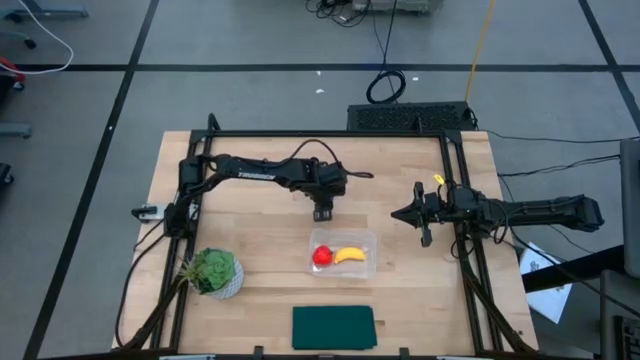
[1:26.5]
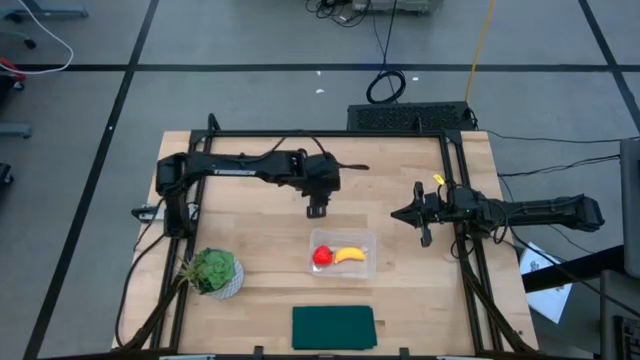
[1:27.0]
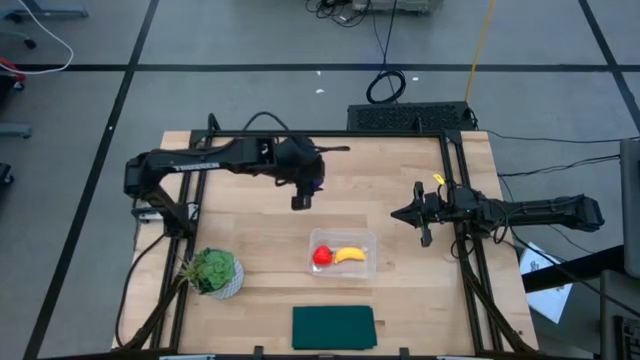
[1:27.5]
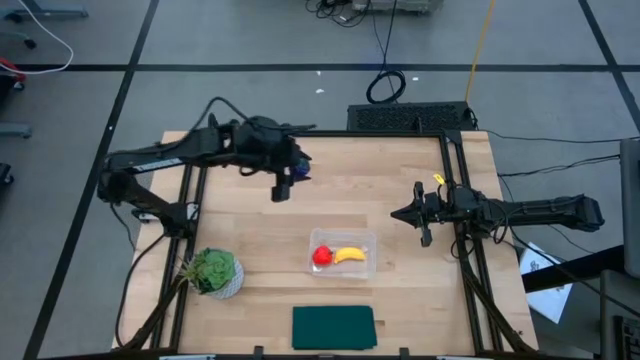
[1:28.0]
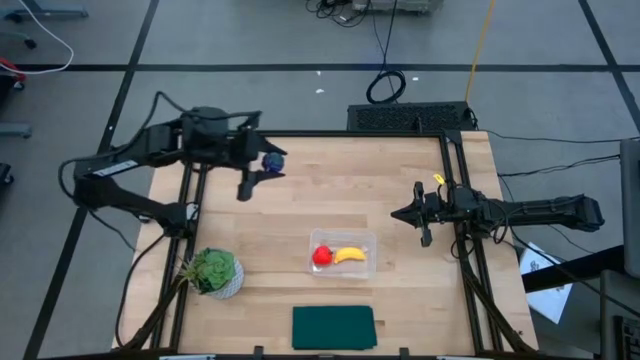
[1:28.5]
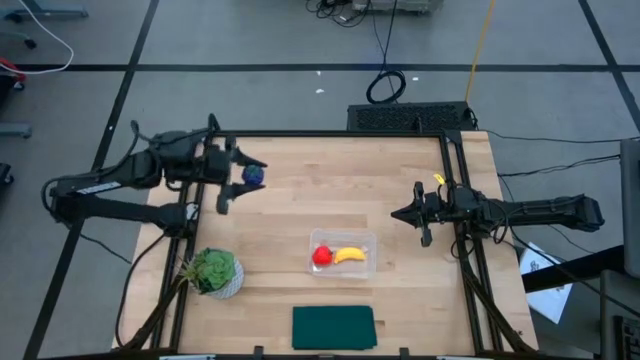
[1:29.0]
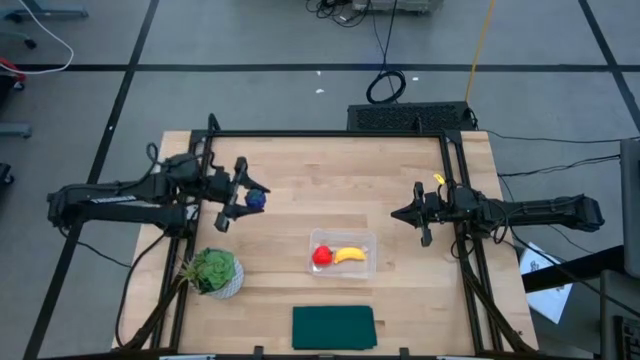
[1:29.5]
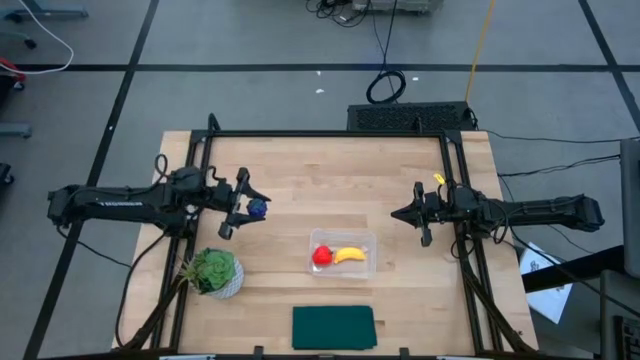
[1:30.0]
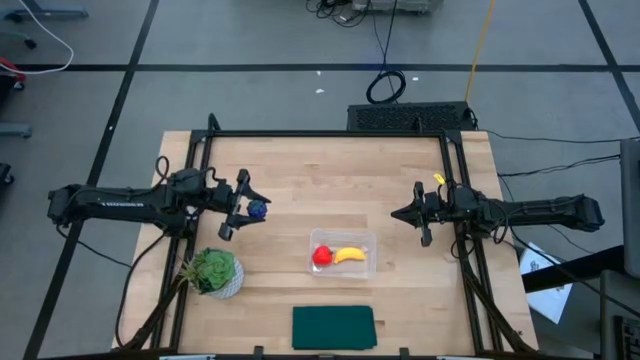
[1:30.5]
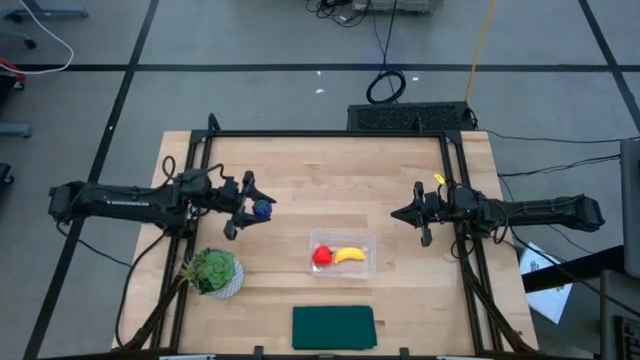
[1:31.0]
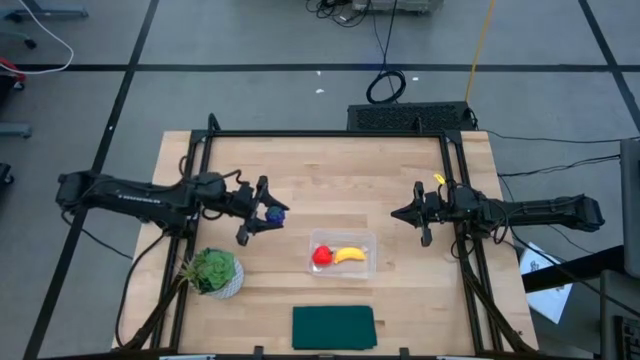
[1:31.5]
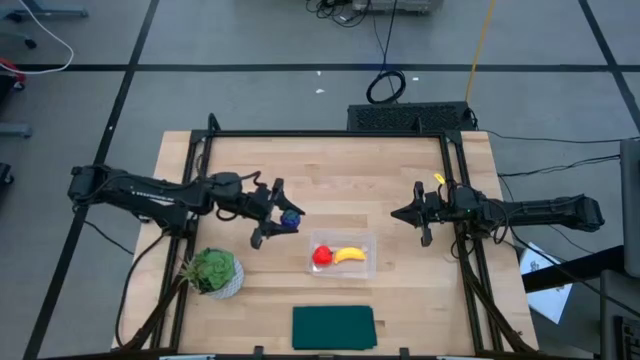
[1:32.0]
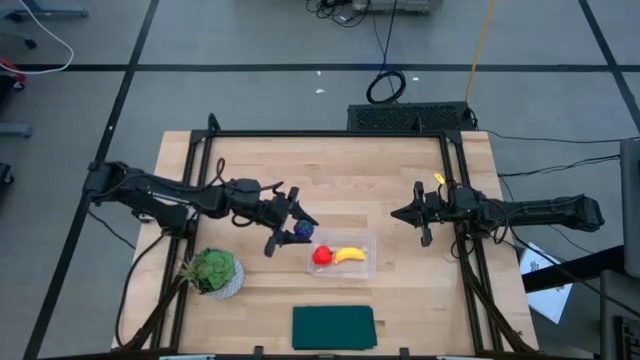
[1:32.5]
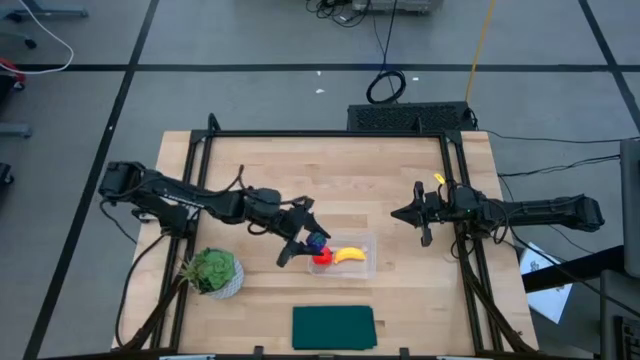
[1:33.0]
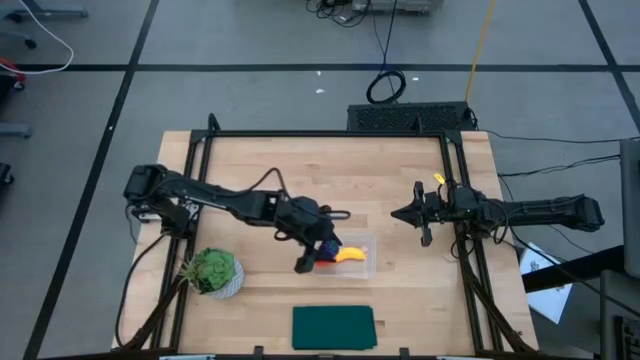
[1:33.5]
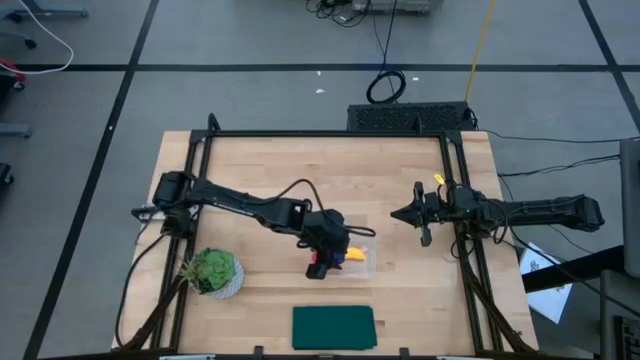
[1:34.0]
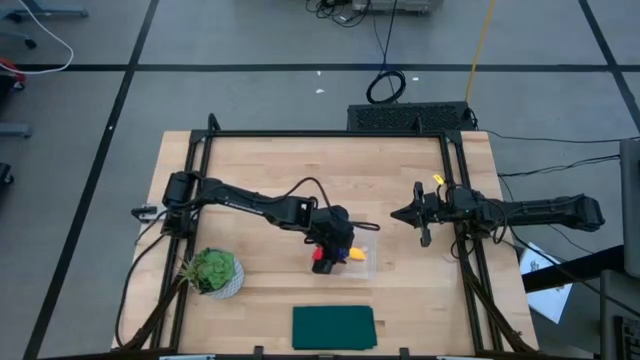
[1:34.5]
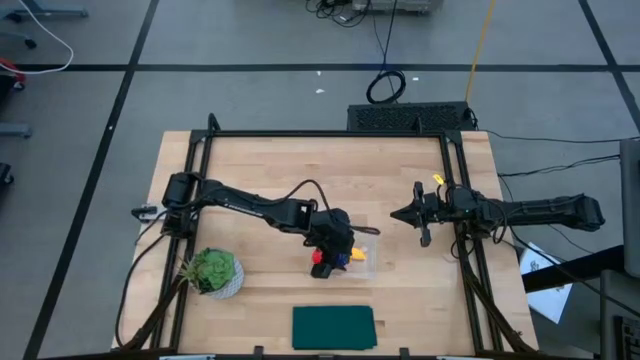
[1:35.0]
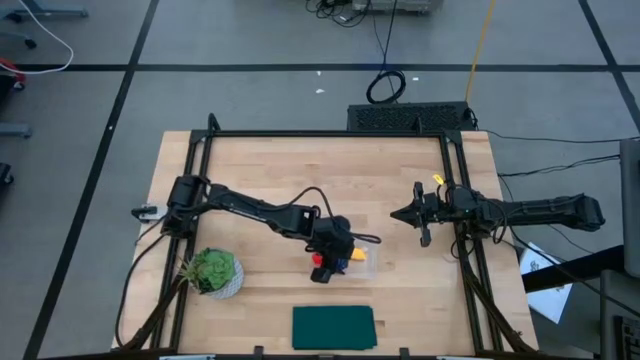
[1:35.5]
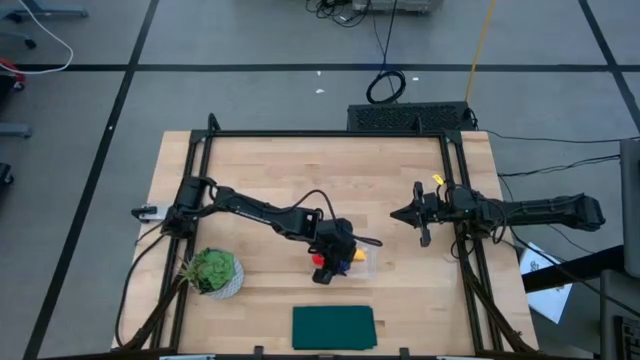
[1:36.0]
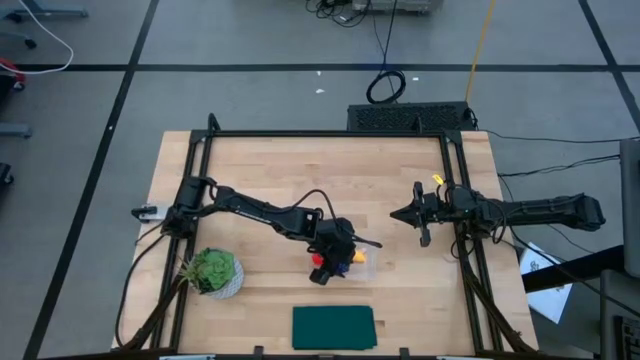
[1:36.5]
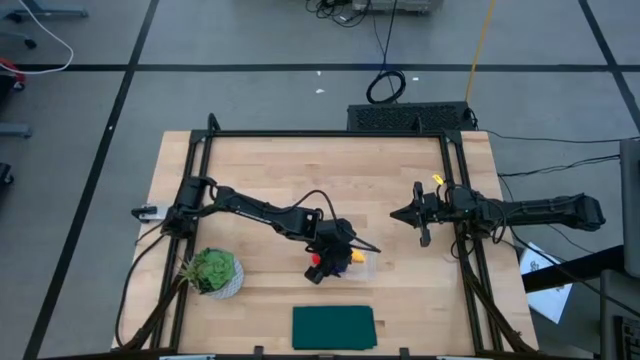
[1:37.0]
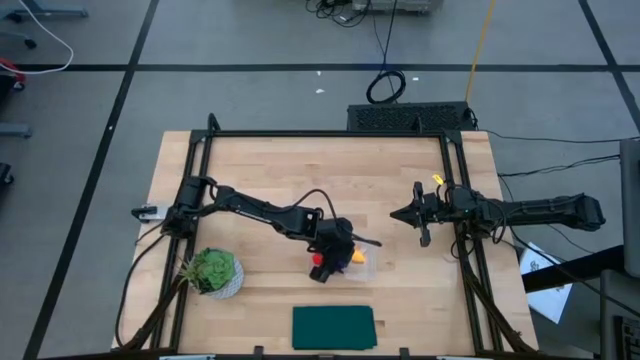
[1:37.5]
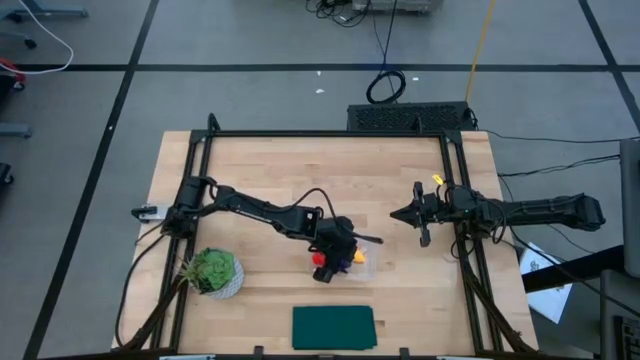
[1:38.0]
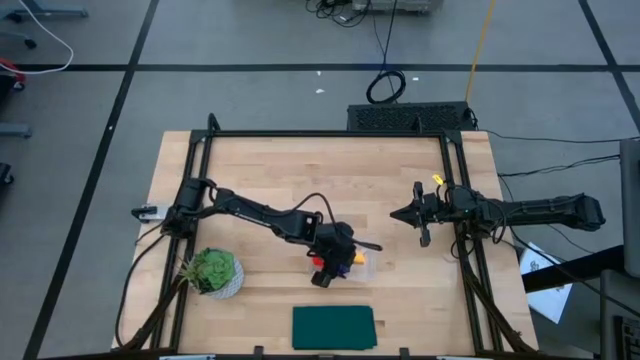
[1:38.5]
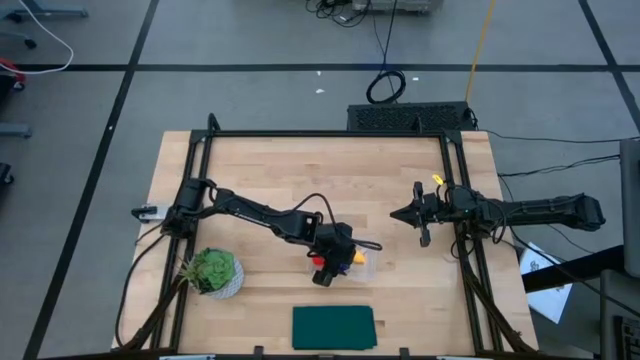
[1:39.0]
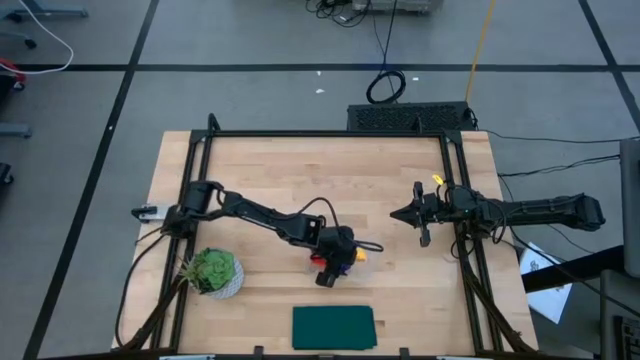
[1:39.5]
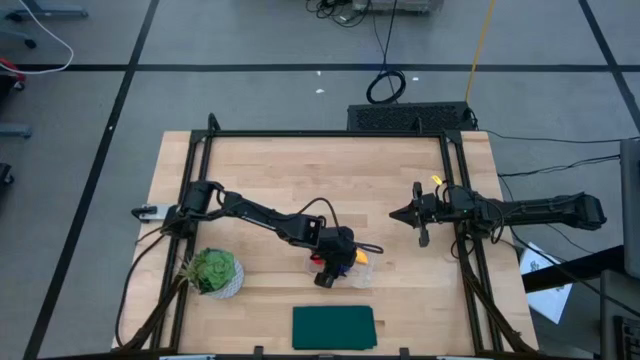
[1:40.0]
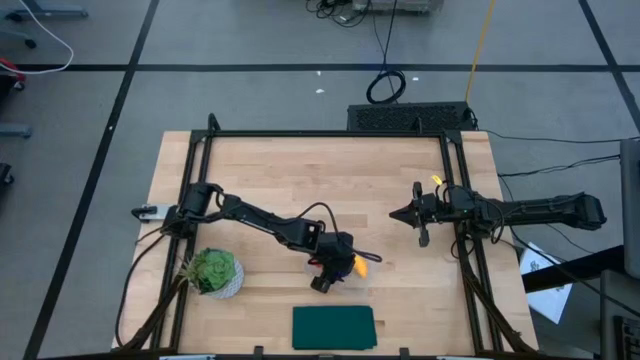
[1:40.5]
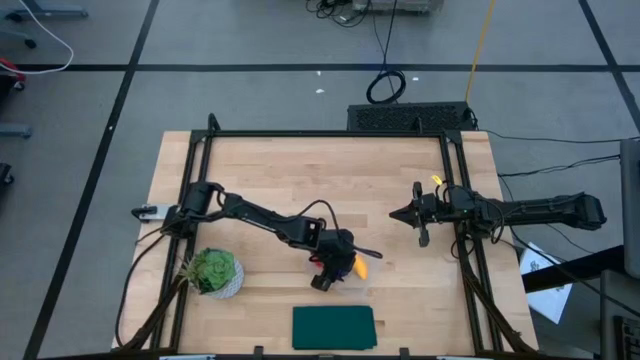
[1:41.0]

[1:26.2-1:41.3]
Task: Pick and placing Produce into tupperware
Put the grapes into the transparent bin

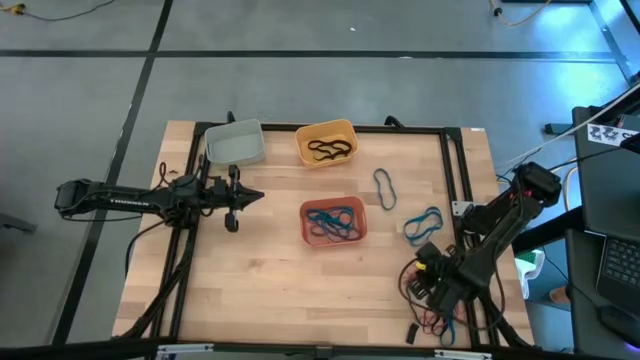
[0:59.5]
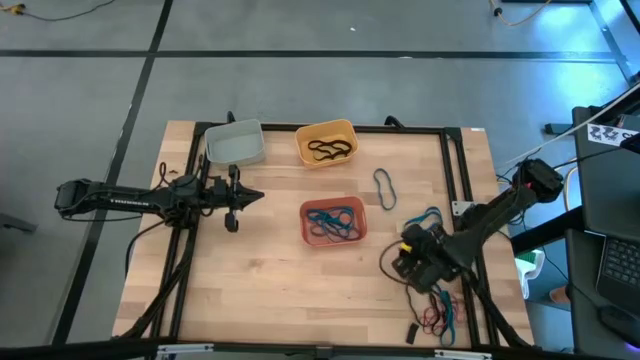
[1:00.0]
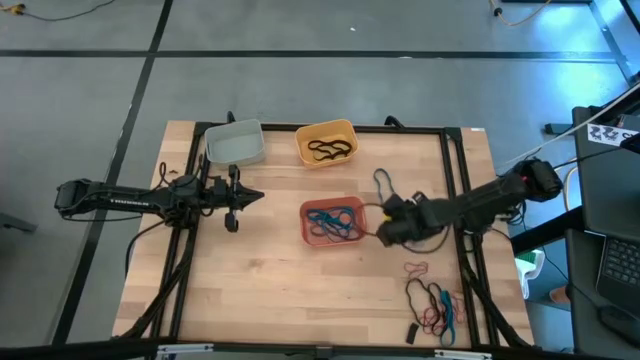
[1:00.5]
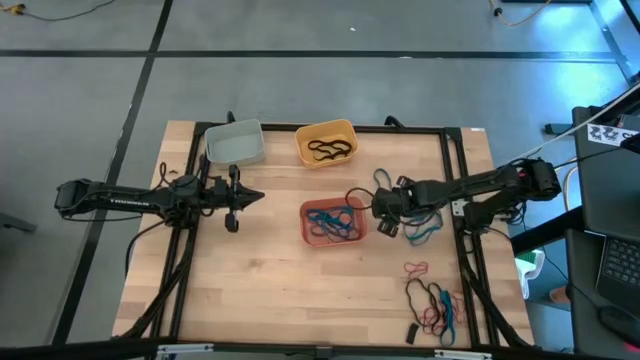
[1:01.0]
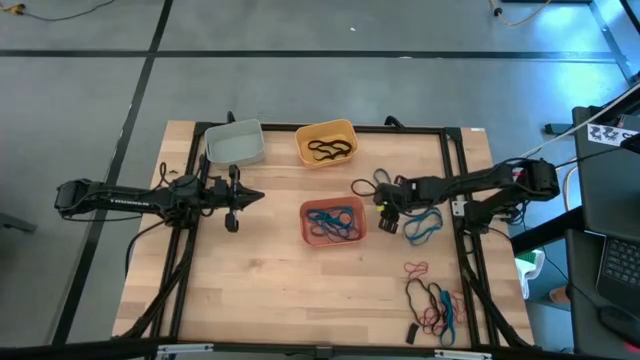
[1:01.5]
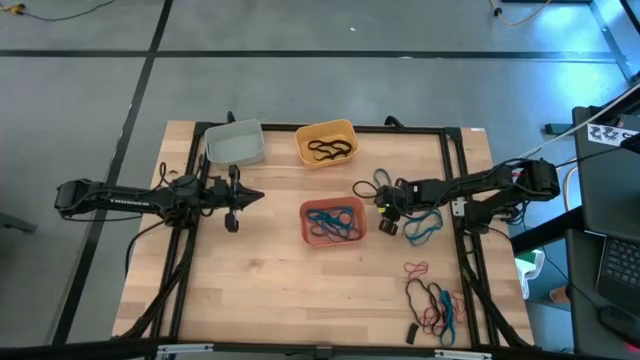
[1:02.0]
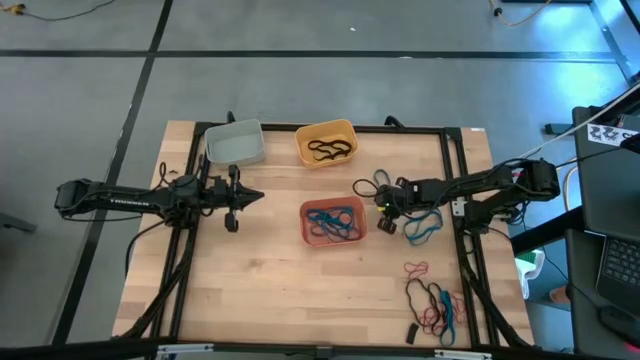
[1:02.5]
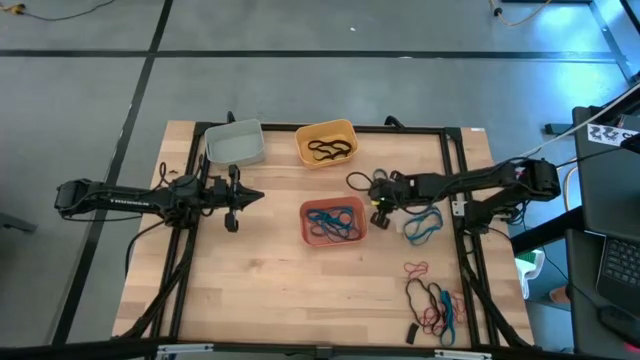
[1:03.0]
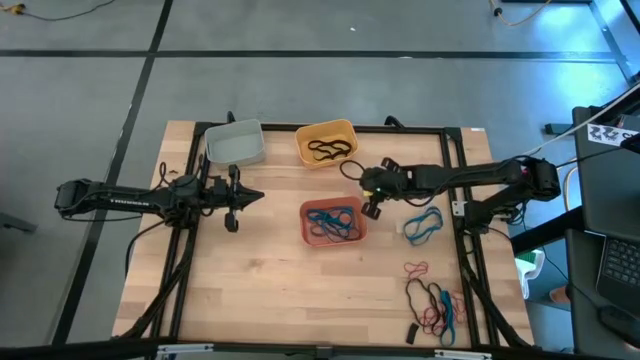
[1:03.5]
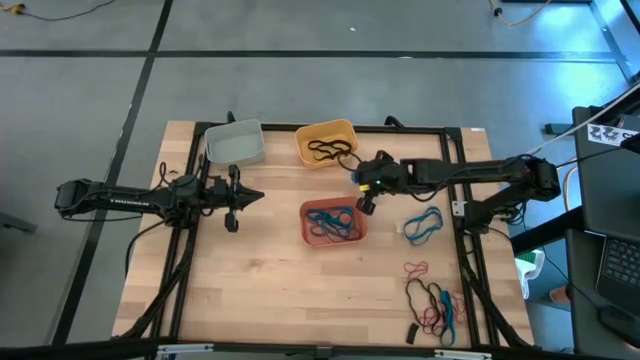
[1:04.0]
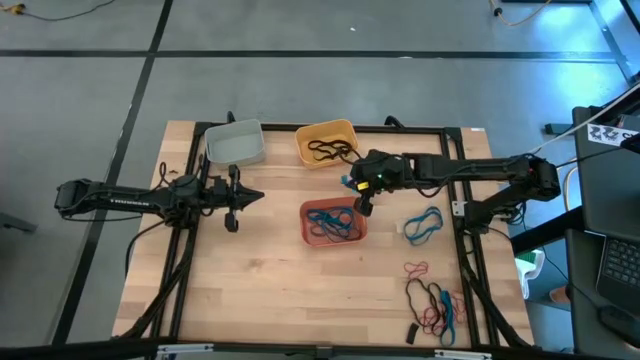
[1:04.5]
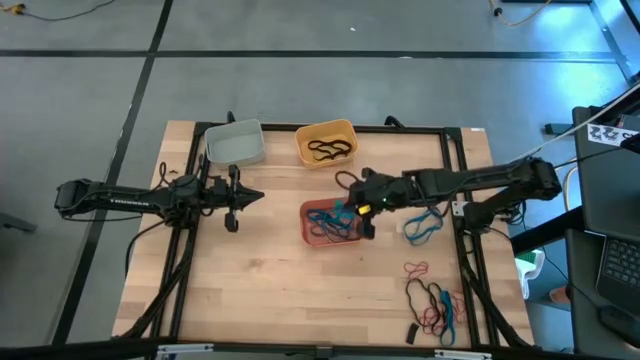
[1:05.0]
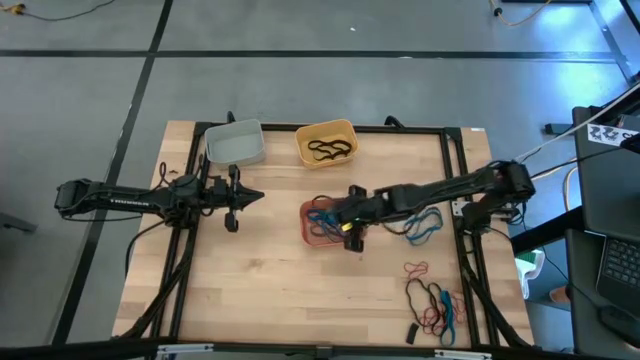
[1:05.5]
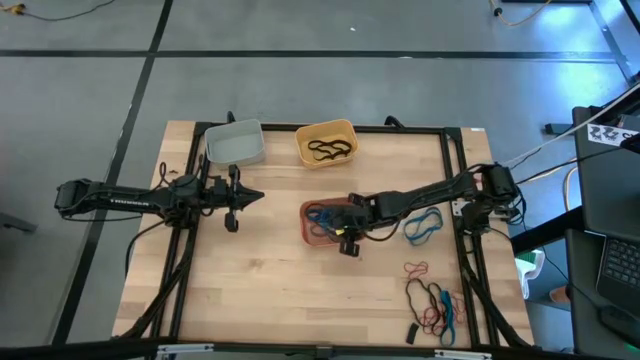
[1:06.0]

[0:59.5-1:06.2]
Task: Sort rubber bands into baskets
Put the blue rubber band into the orange bin
